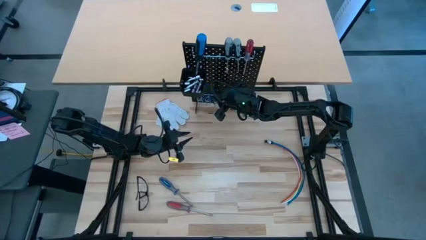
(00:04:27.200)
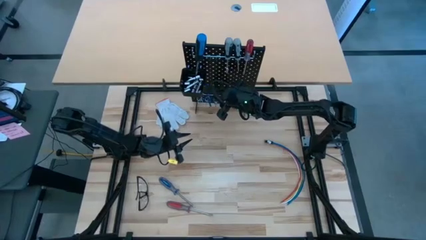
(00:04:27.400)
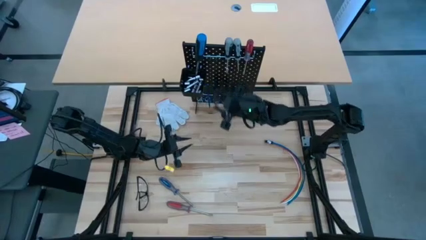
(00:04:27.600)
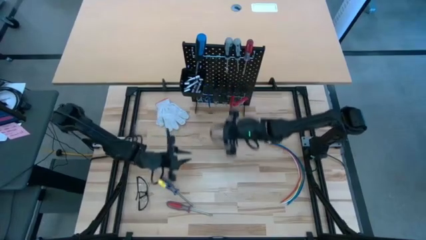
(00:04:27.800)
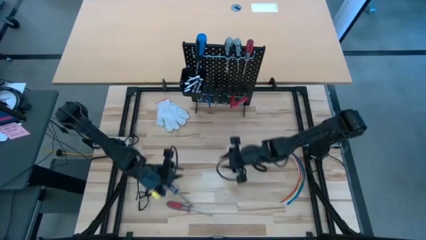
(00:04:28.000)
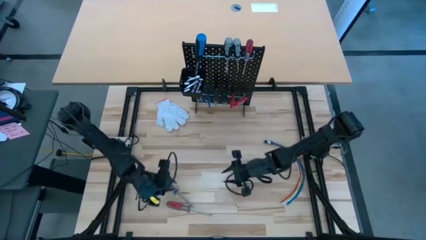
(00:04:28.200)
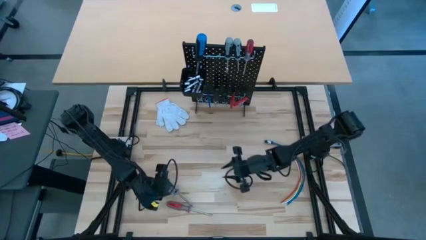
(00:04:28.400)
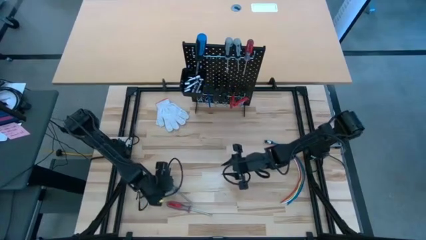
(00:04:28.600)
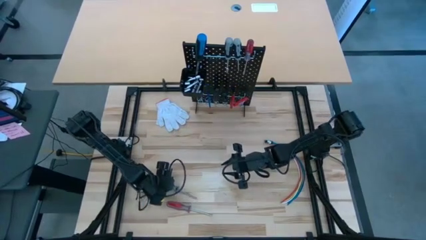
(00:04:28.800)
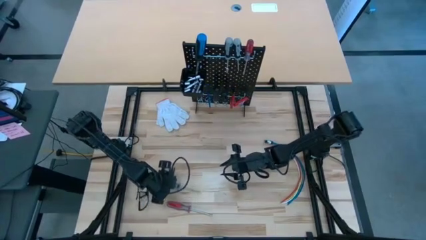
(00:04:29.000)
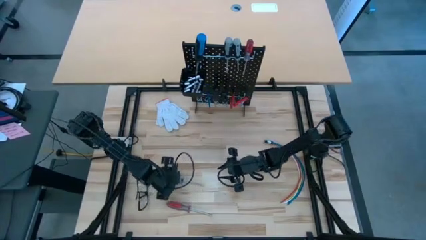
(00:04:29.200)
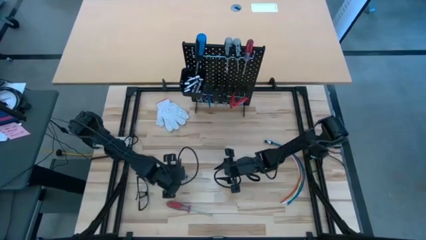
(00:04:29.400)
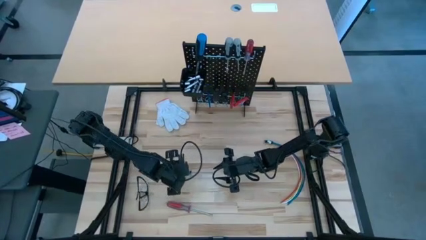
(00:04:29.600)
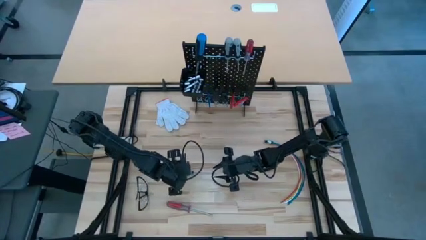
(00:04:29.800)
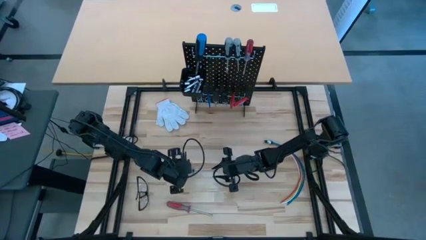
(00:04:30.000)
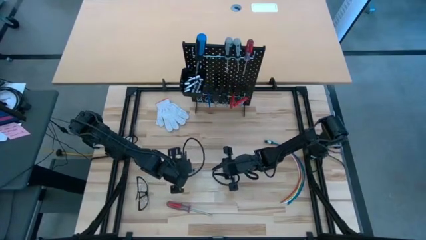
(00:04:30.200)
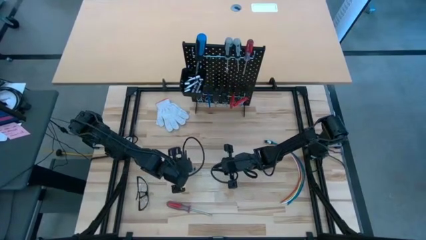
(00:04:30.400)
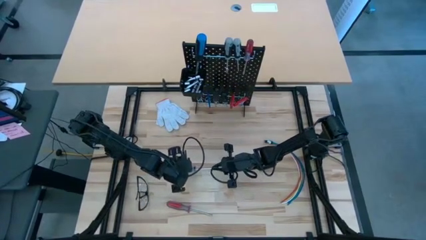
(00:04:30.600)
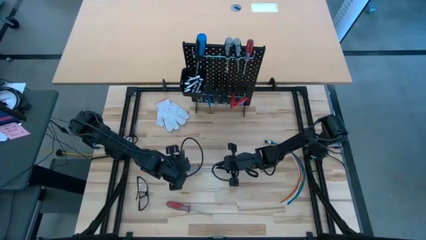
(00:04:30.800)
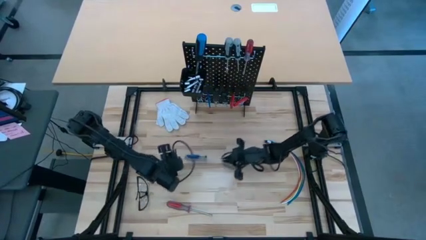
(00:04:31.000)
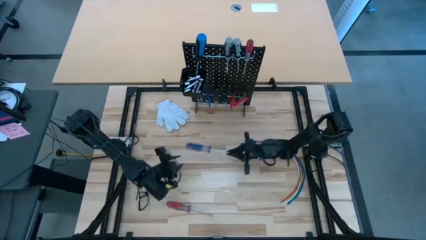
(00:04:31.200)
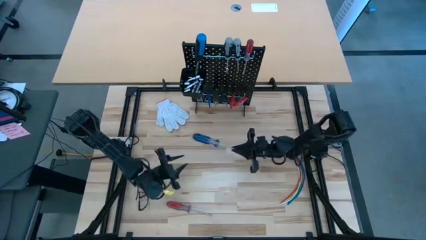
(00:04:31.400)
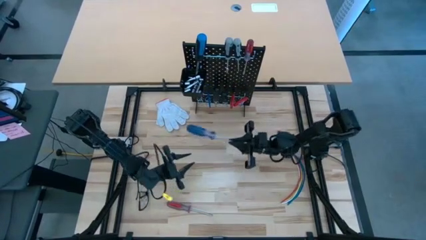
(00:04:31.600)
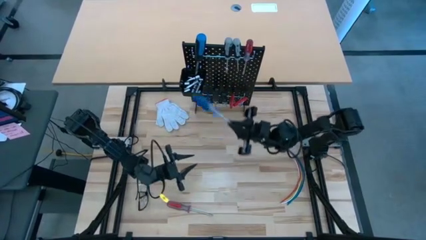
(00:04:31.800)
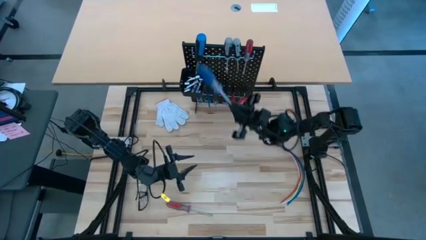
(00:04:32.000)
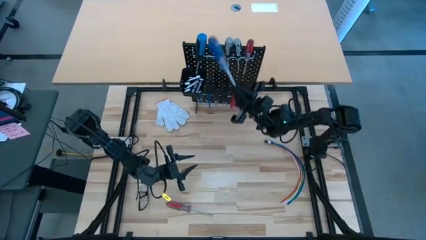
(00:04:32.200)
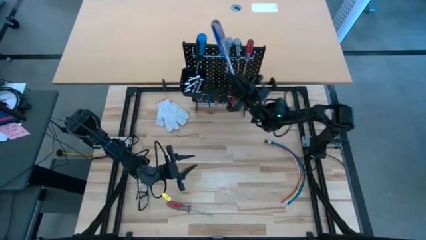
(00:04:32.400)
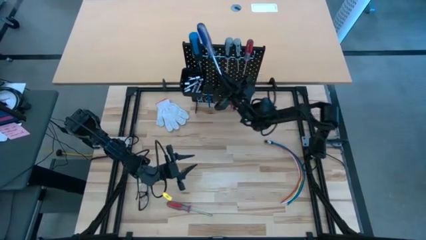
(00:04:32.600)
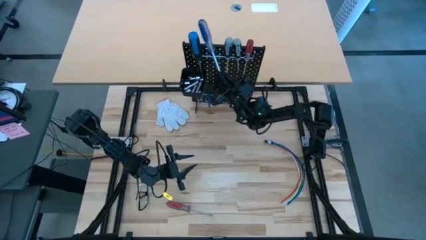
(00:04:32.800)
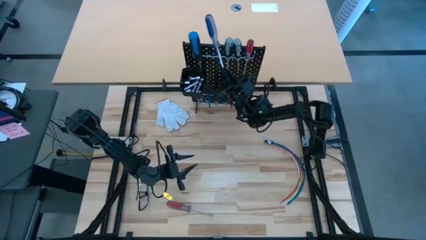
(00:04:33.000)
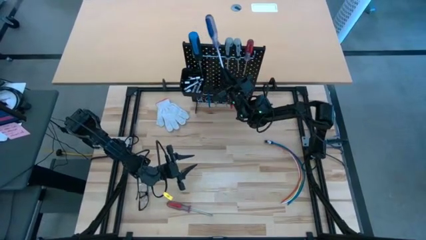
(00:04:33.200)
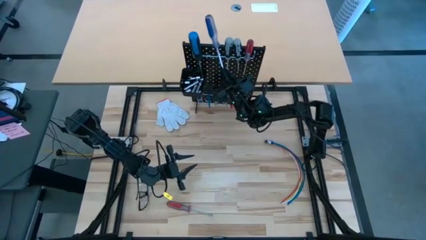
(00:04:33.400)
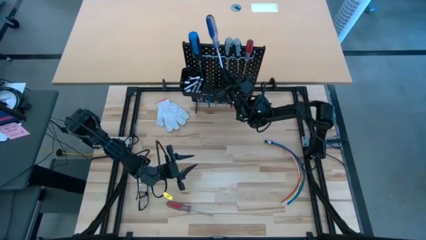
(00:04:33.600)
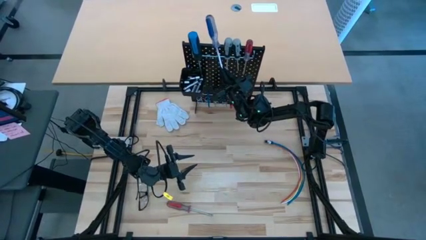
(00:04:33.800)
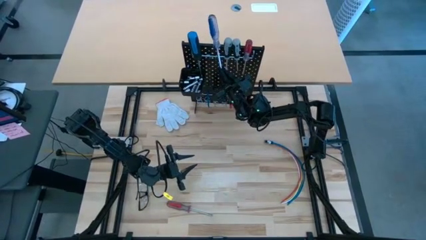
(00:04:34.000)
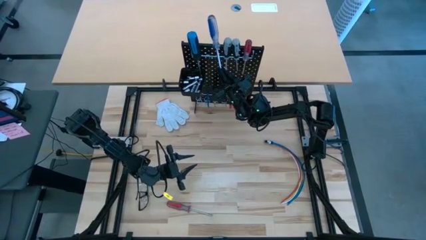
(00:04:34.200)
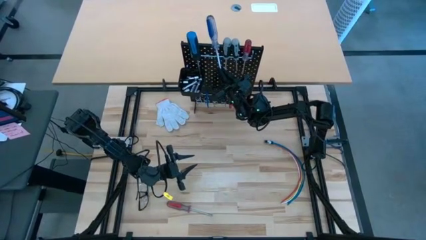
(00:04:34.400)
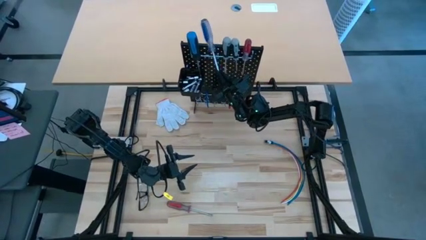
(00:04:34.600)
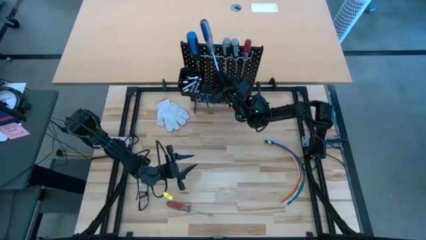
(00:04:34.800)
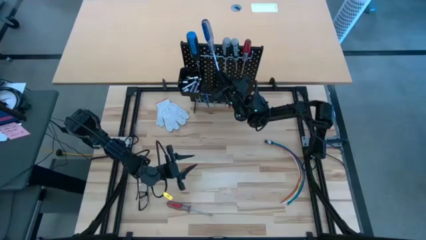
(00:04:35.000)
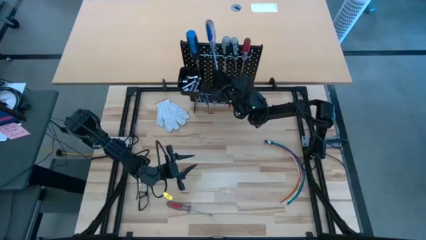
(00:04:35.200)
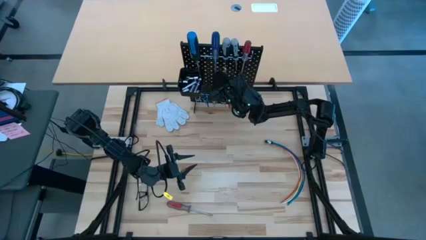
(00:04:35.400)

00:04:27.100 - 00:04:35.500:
Task: Hang tools onto peg board
Hang the blue transparent screwdriver on the pegboard

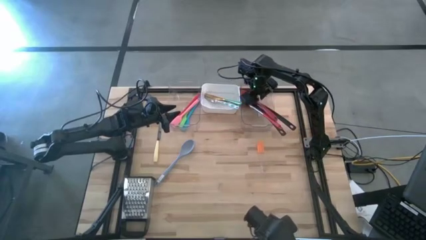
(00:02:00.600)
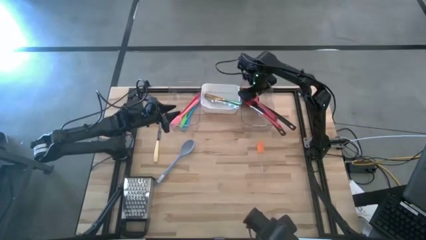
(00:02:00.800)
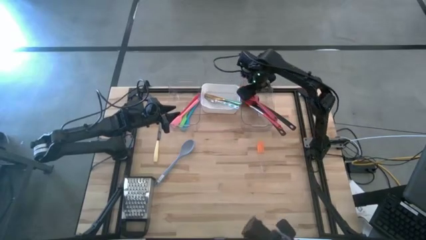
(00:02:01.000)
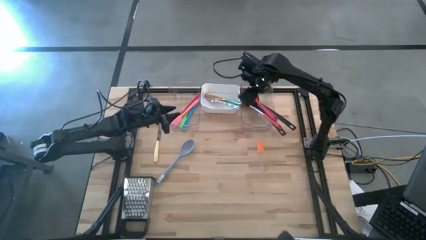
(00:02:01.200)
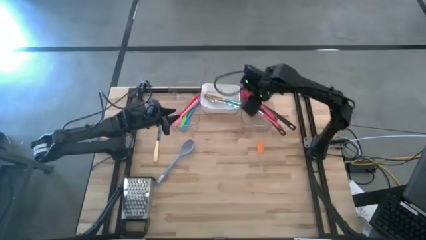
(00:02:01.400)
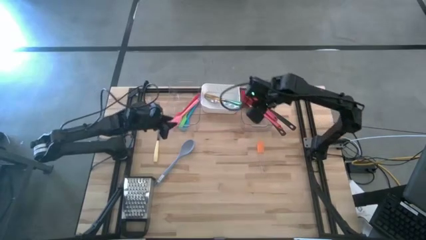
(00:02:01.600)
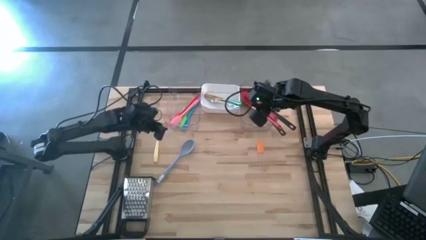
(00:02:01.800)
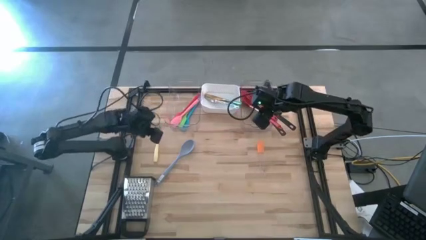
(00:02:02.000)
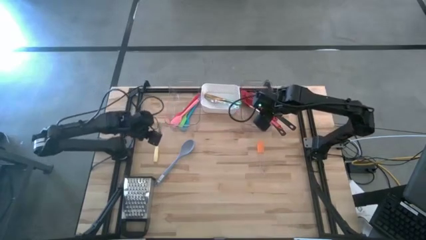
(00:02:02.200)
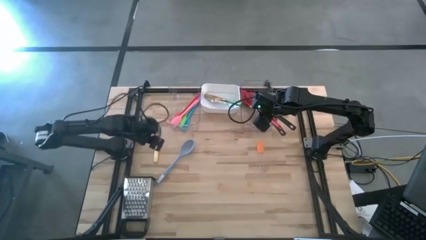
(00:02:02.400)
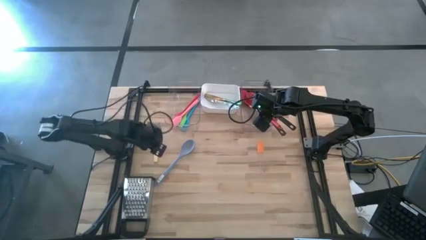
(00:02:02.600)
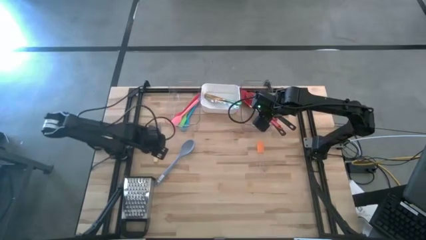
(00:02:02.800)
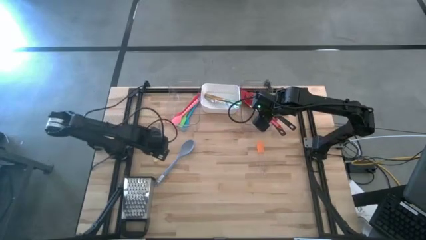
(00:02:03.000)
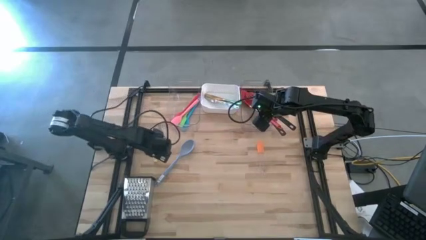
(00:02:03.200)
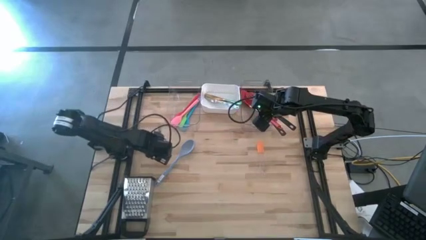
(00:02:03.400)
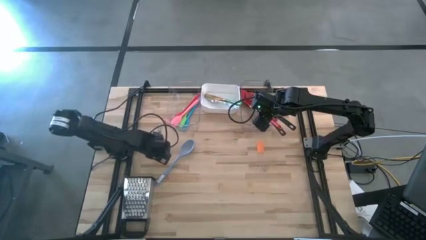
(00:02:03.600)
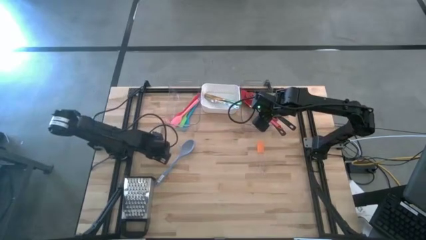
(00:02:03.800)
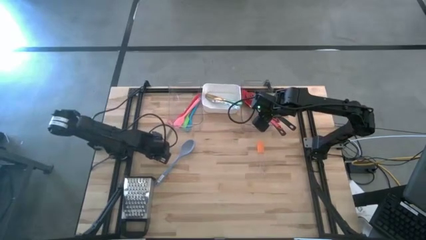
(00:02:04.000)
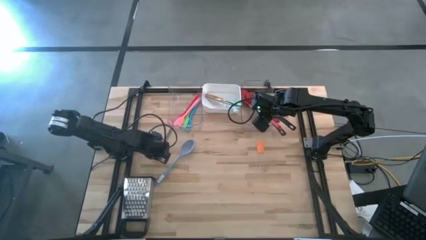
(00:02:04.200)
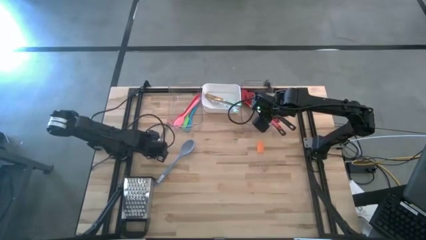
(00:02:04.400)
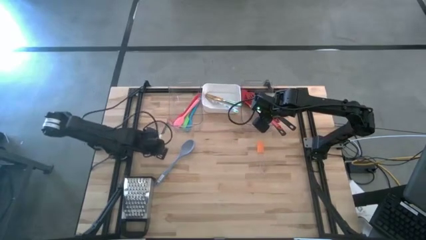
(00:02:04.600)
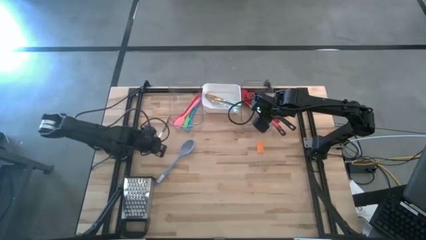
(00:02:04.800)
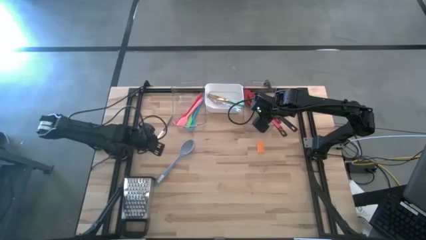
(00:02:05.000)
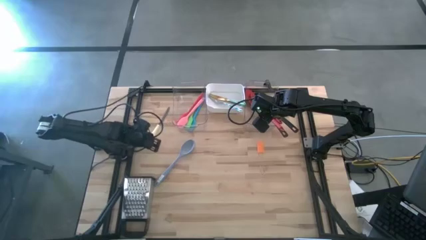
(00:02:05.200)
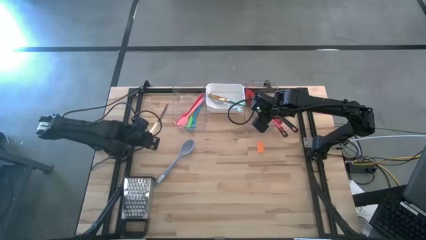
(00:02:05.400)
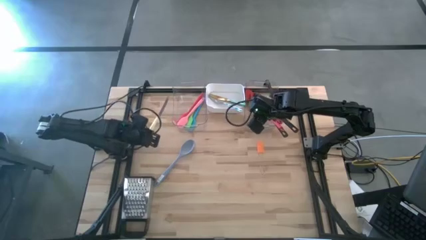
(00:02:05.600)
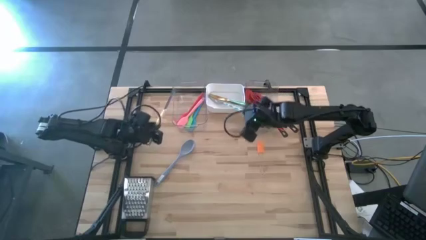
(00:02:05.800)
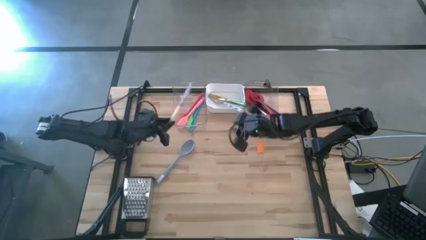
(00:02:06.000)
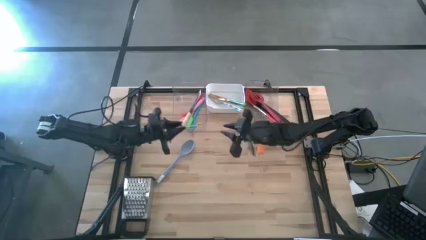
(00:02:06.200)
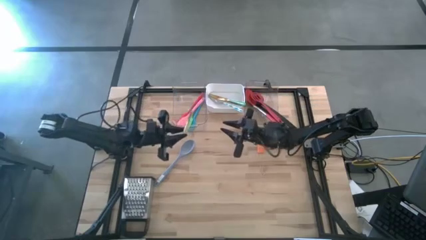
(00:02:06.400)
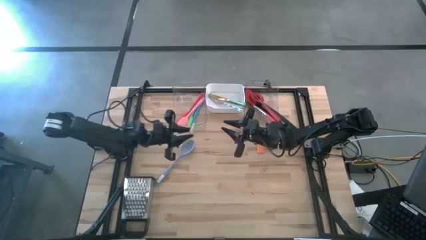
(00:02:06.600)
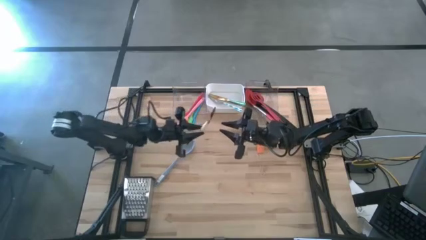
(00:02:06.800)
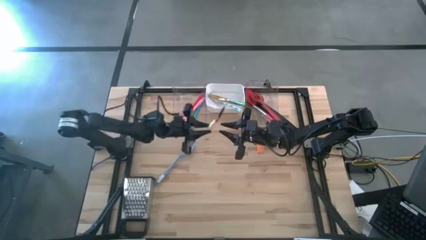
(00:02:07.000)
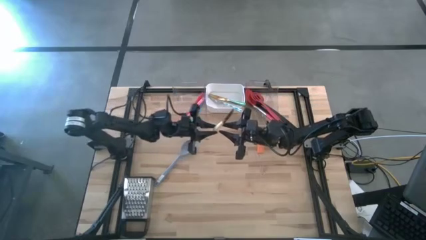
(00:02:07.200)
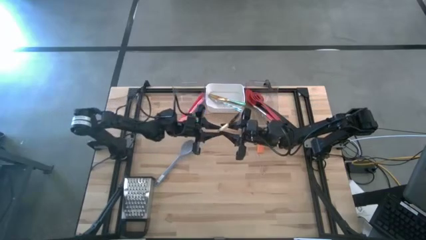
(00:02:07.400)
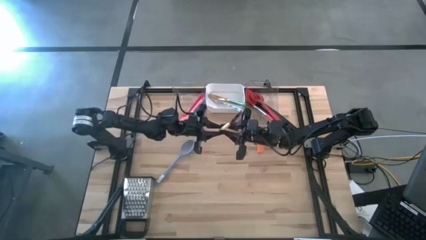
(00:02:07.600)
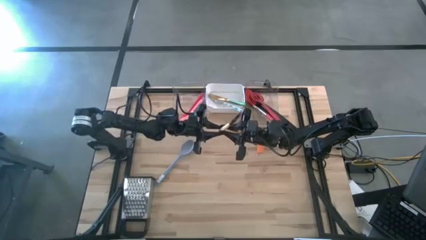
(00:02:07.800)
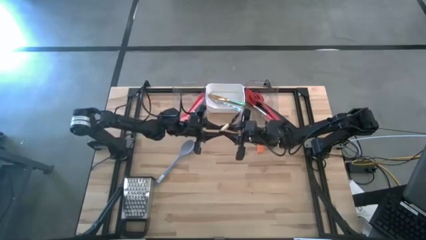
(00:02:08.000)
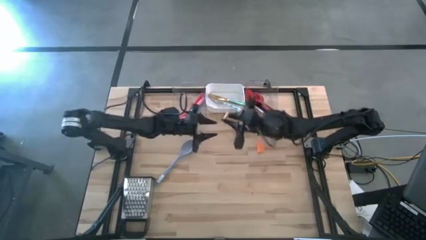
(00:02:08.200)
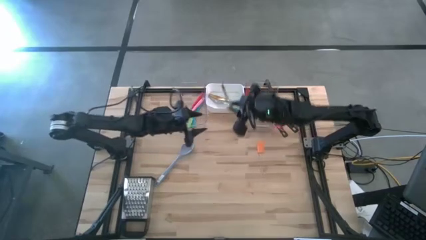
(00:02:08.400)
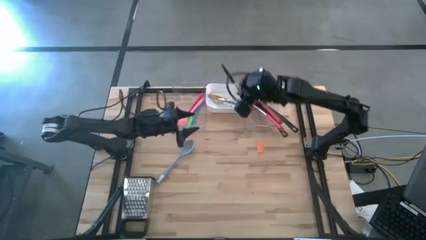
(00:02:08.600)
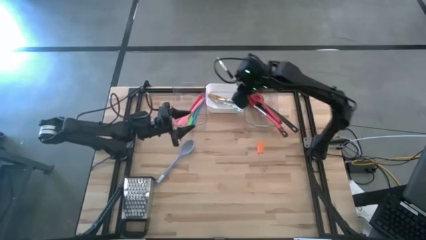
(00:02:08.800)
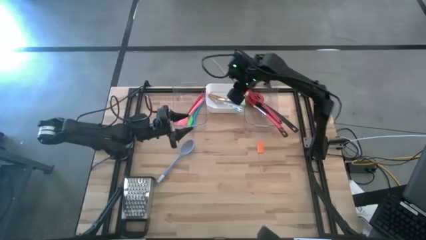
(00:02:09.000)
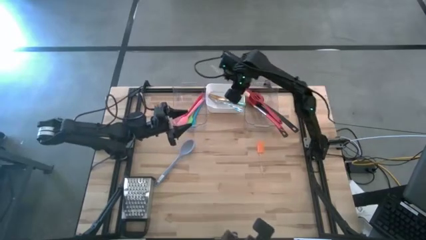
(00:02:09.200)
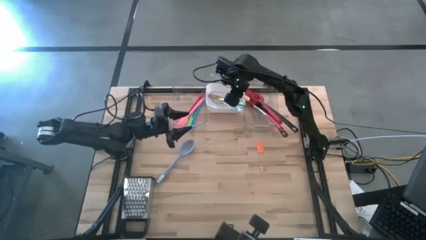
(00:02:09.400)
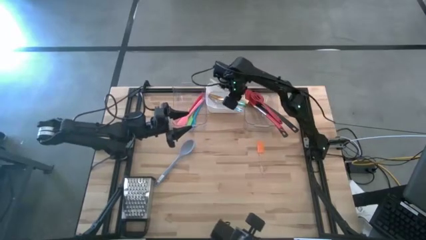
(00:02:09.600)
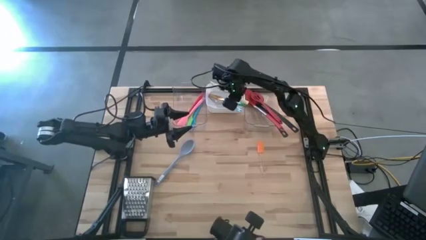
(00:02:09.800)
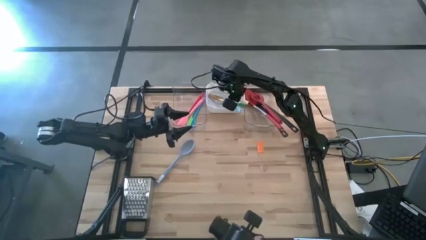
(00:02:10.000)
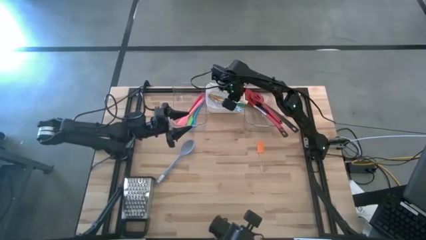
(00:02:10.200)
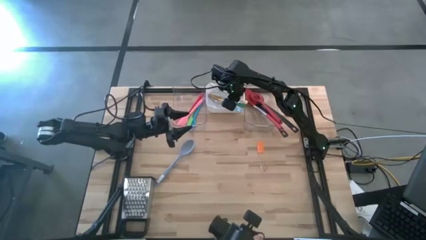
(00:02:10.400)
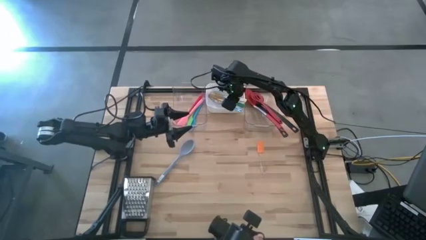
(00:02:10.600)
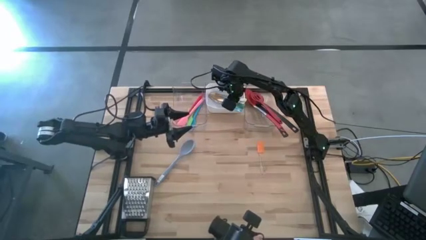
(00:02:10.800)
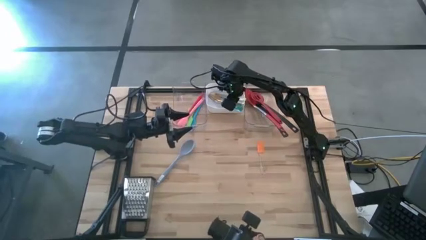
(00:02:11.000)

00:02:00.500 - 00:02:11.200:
Task: Pick & Place Kitchen Items
Put the white knife into the white bin
